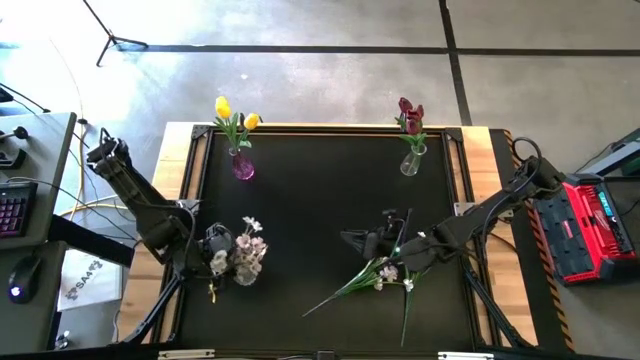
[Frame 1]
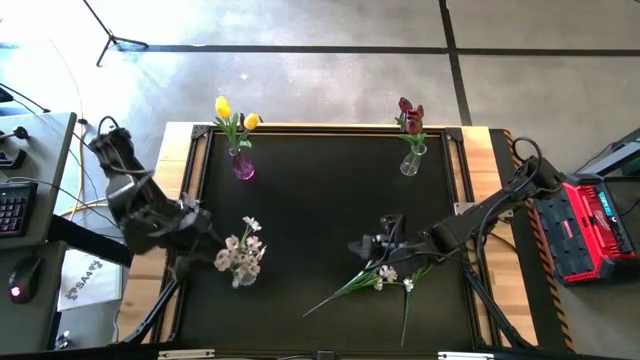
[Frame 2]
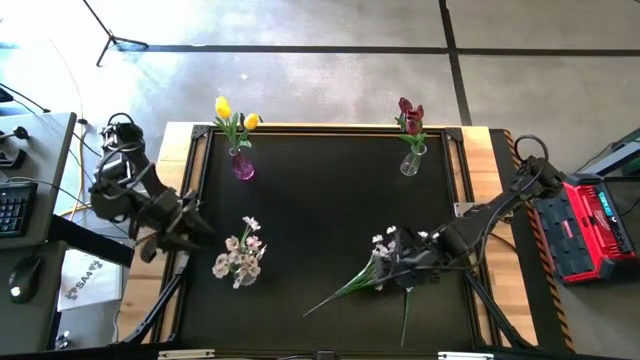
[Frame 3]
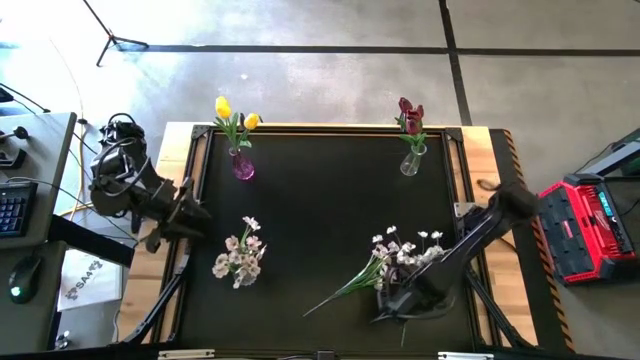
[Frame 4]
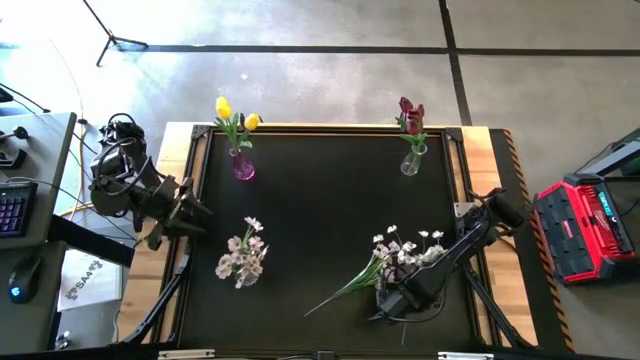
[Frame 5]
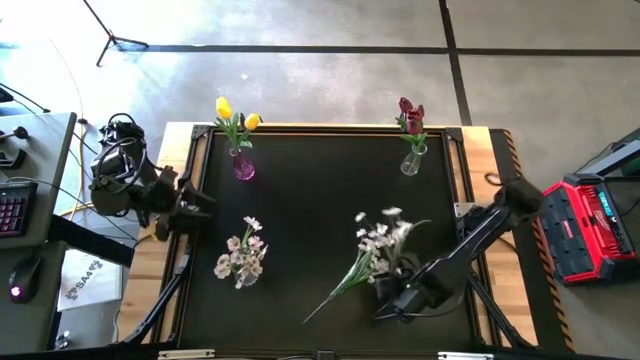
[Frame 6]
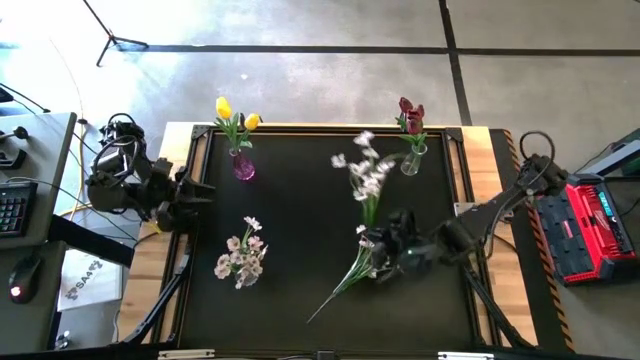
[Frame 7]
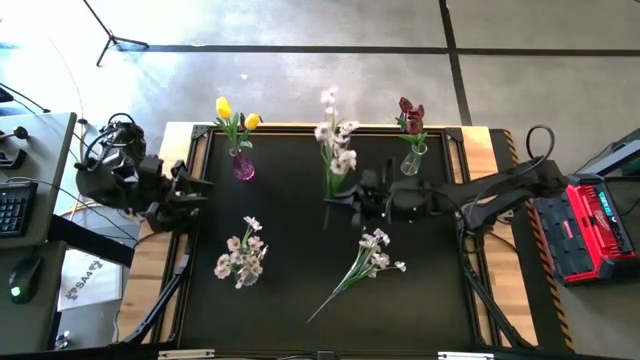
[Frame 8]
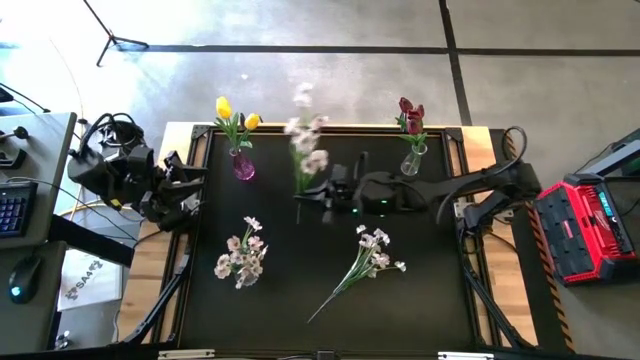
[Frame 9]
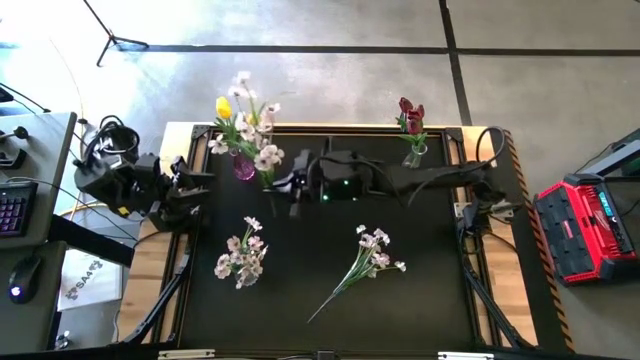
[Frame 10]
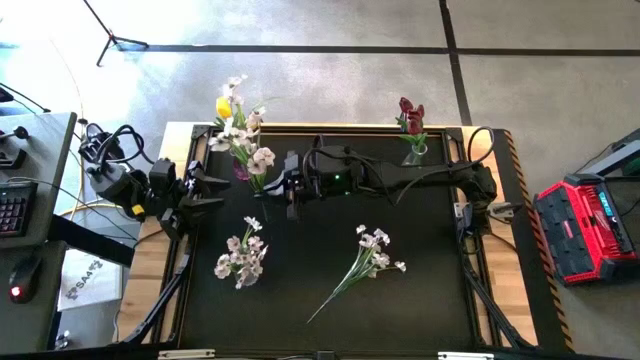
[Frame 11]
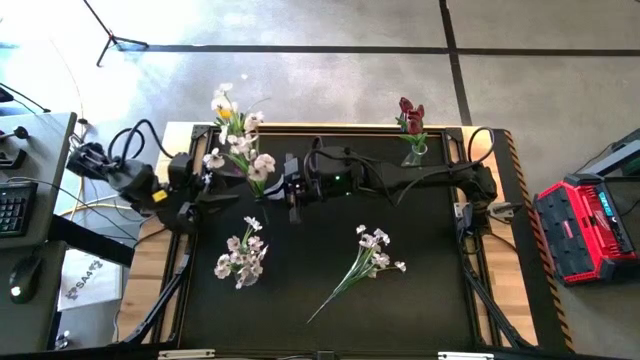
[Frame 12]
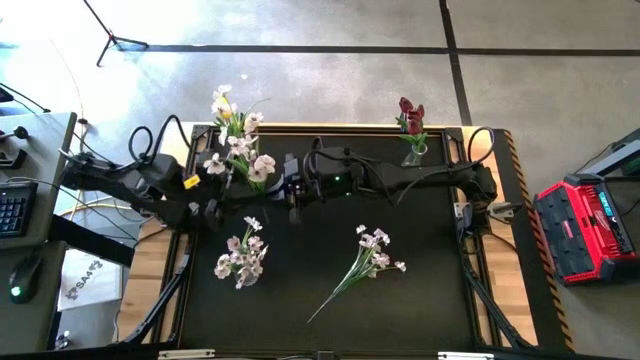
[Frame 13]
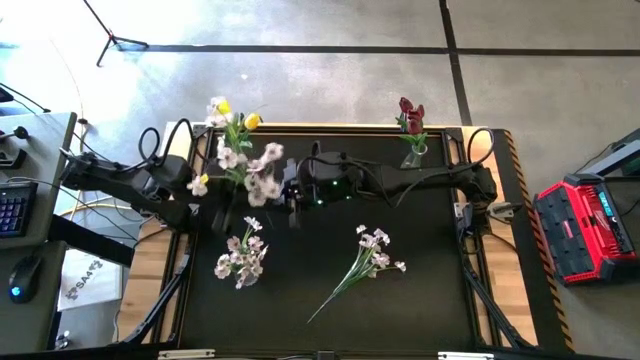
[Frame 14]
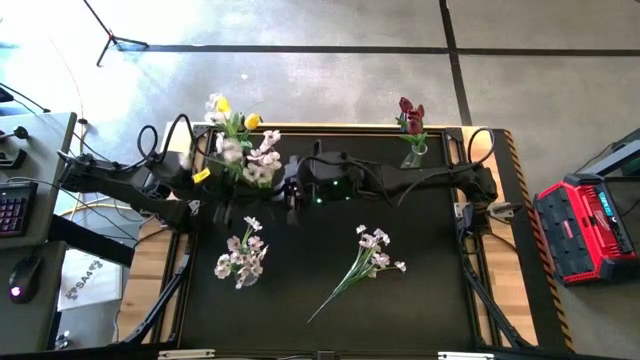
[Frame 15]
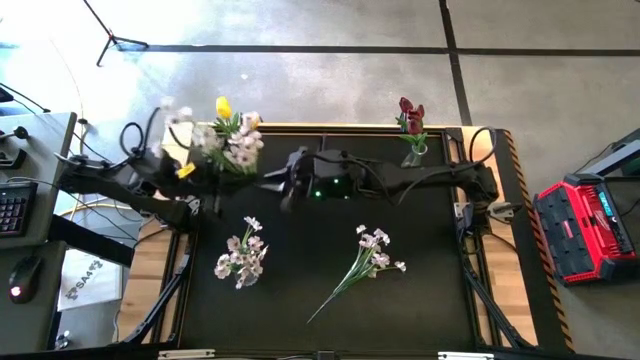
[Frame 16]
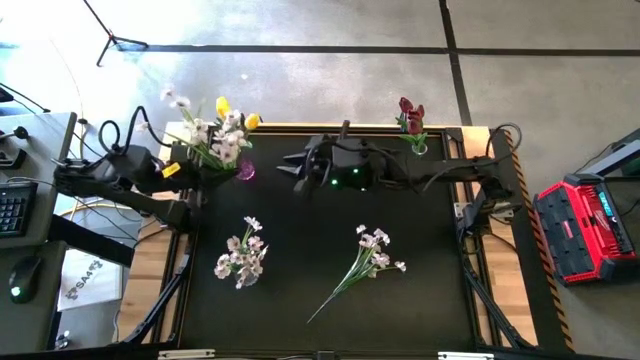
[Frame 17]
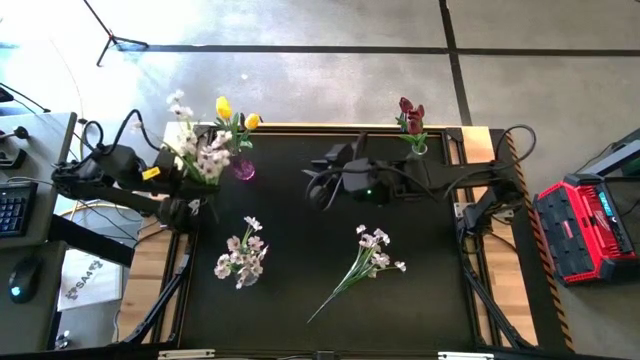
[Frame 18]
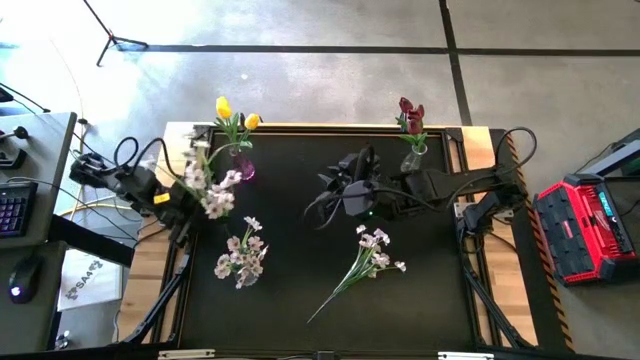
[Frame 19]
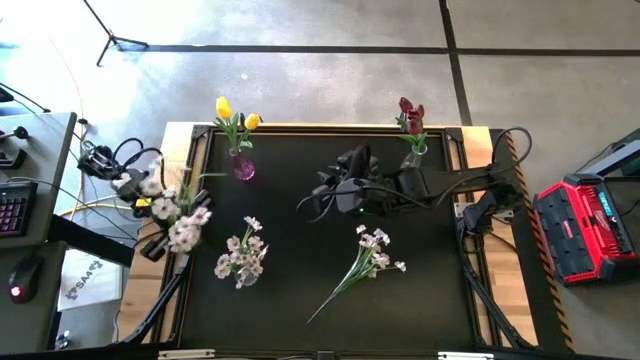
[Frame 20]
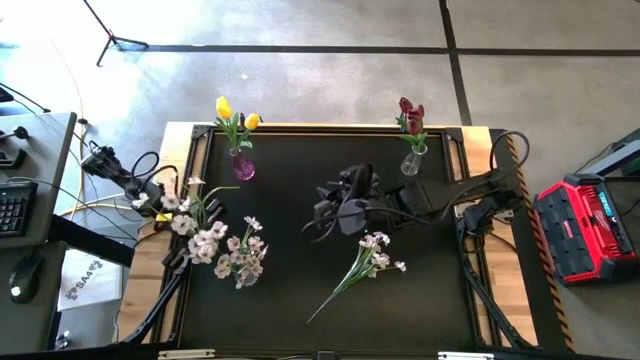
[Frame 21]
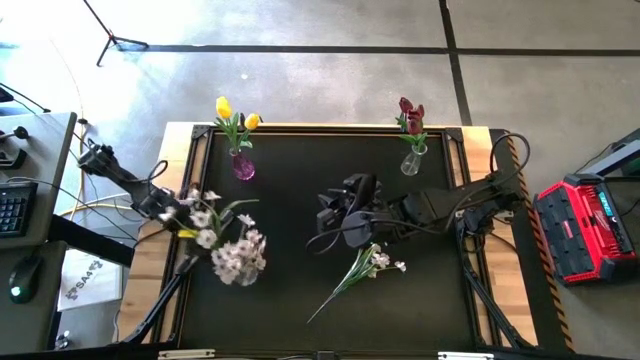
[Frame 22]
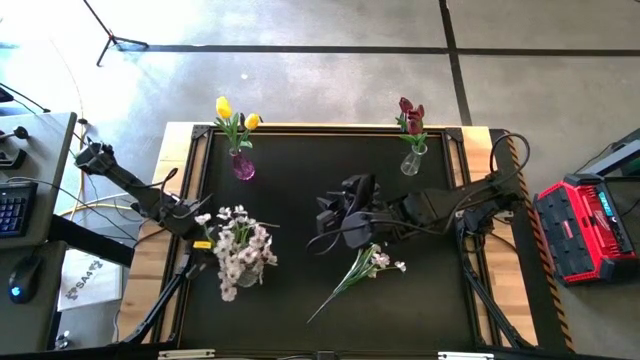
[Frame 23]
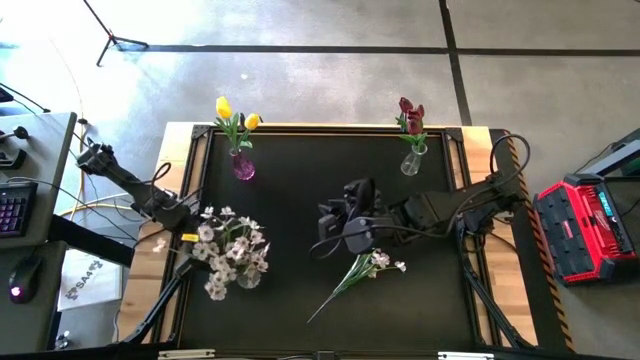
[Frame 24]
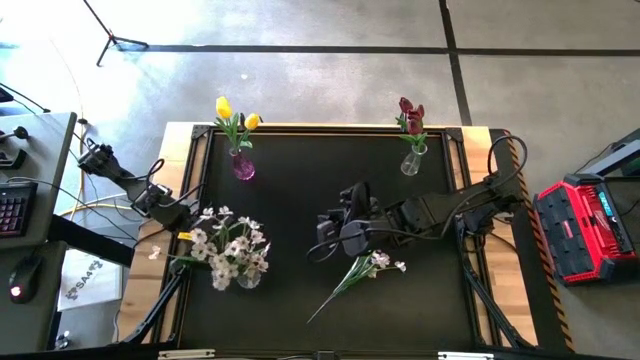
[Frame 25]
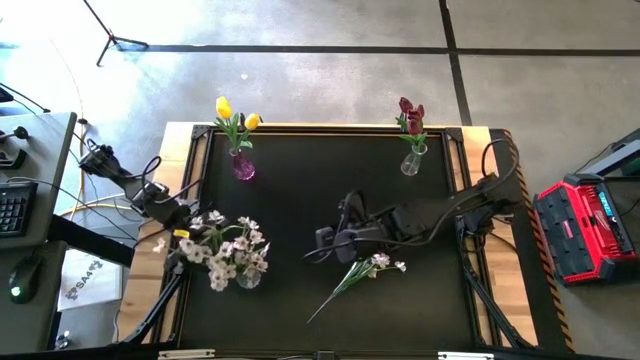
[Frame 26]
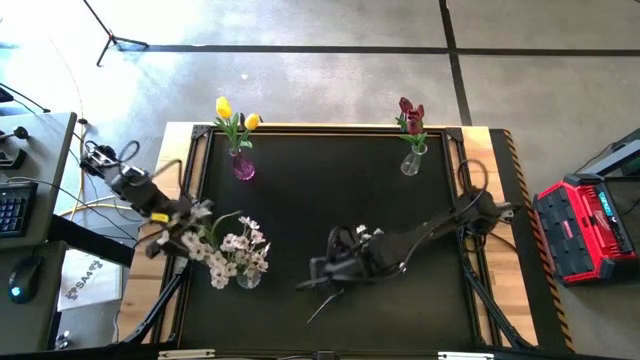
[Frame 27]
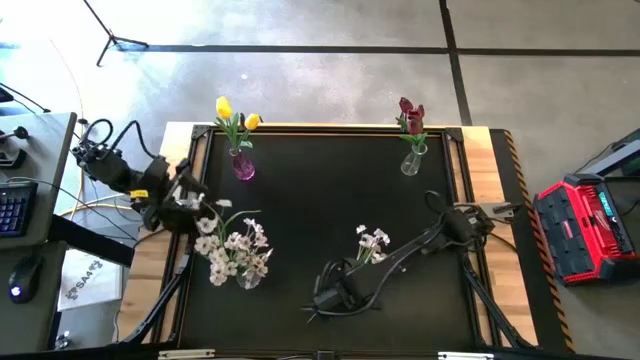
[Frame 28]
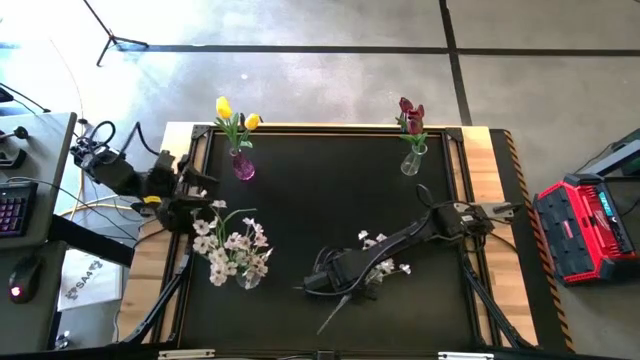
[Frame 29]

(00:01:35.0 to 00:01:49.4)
Task: Sort flowers into vase by color
Put the right white flower into the bottom transparent vase

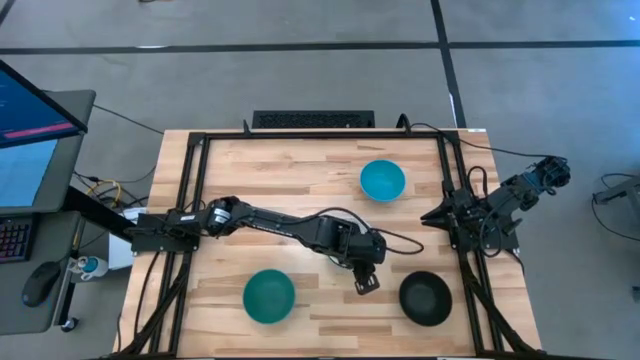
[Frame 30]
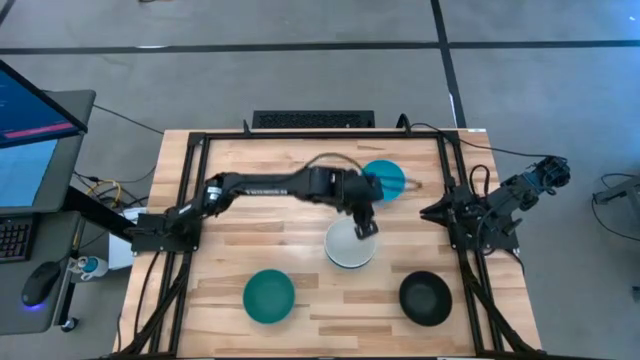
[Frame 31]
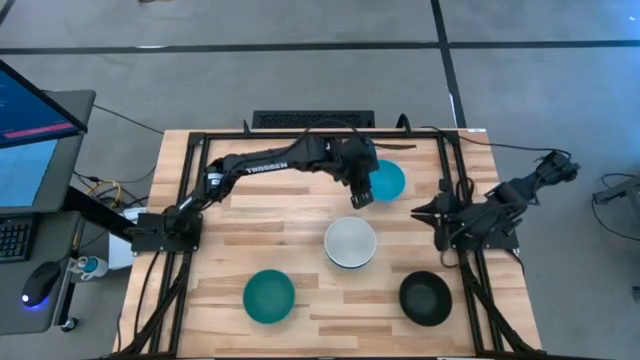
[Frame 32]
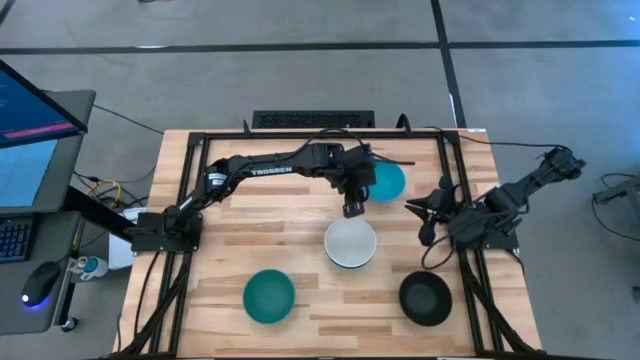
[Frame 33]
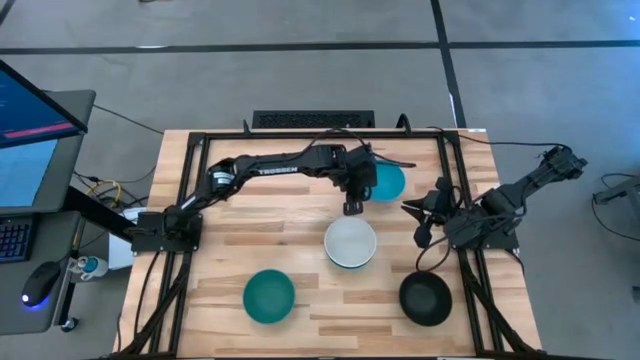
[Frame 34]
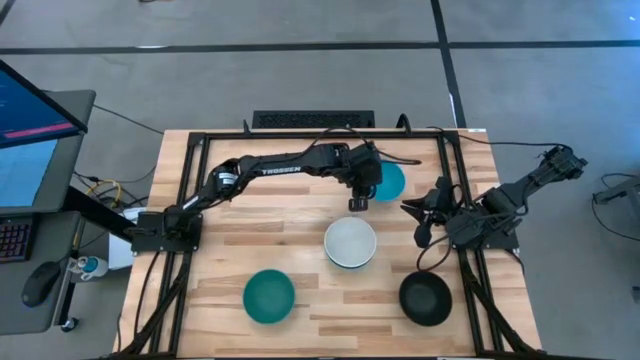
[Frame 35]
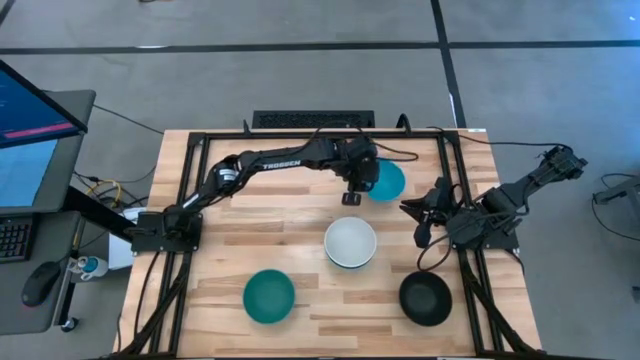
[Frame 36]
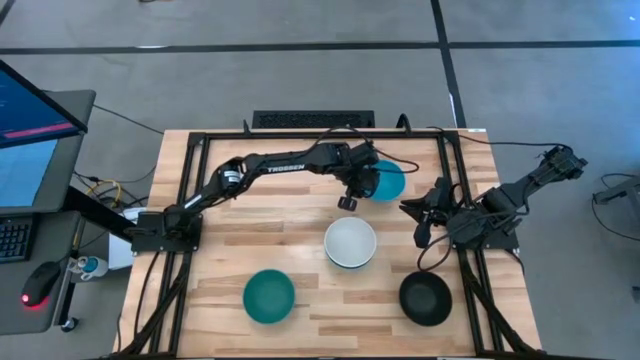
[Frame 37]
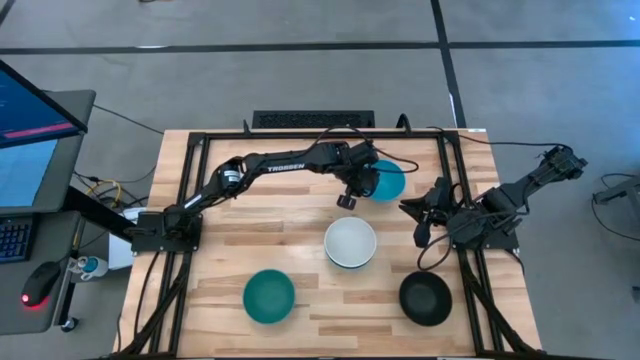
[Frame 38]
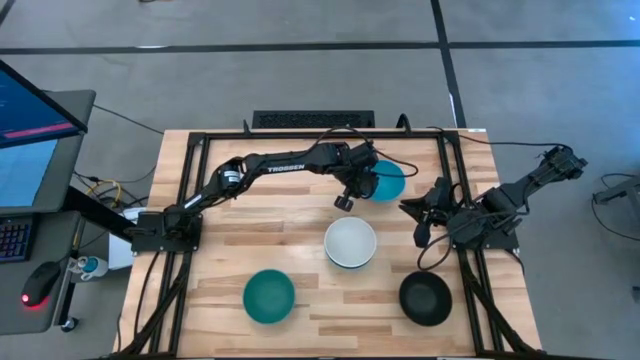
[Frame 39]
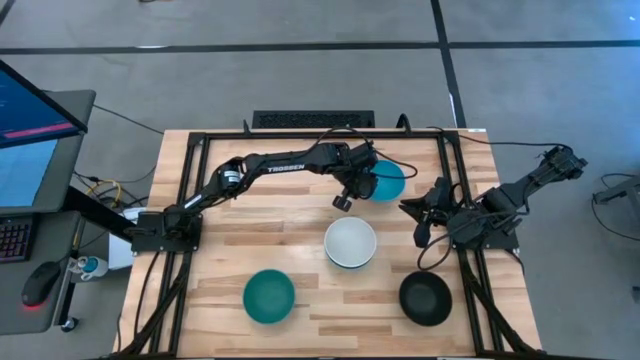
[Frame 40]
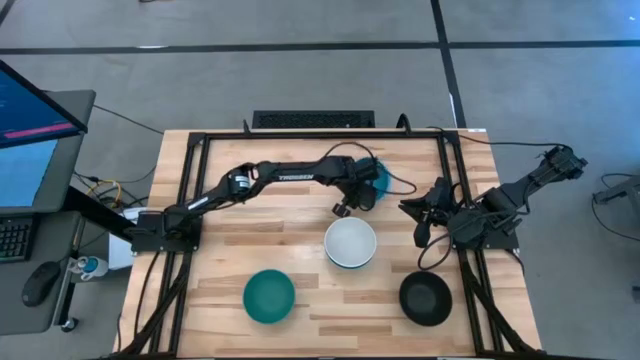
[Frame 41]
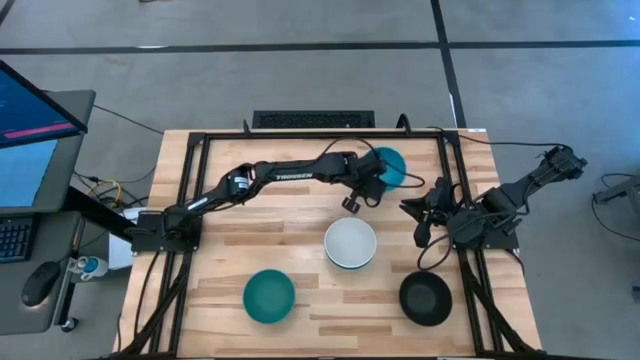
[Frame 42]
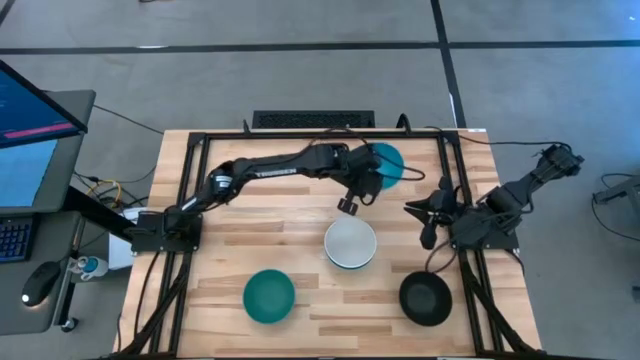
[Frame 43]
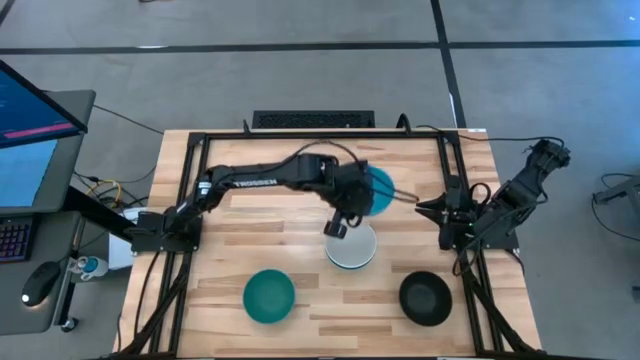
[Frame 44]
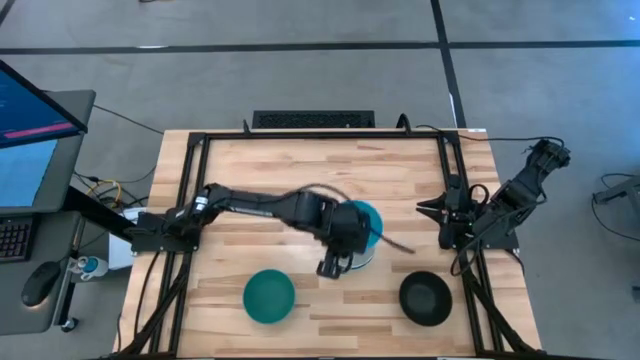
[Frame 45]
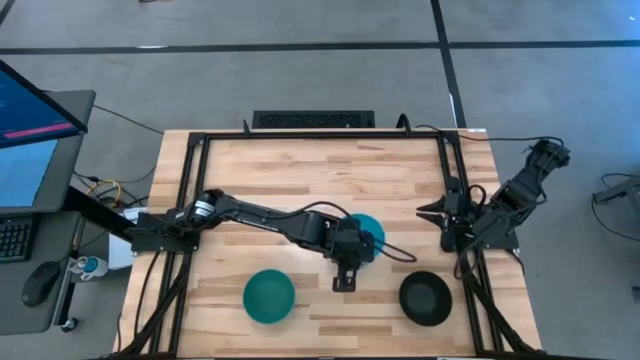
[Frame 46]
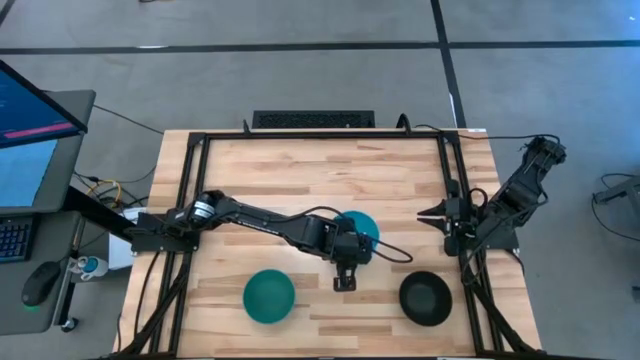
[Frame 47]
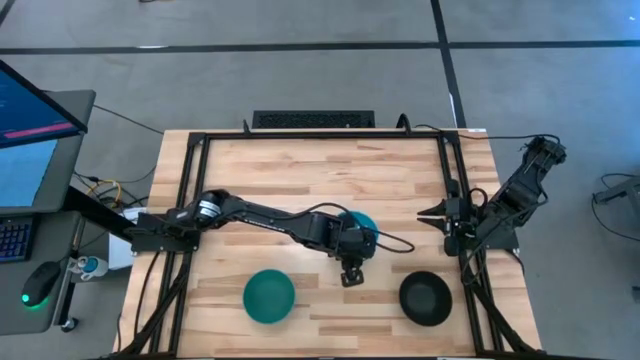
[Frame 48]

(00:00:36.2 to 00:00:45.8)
Task: Nest bowls inside each other
Stack the blue bowl on the white bowl
